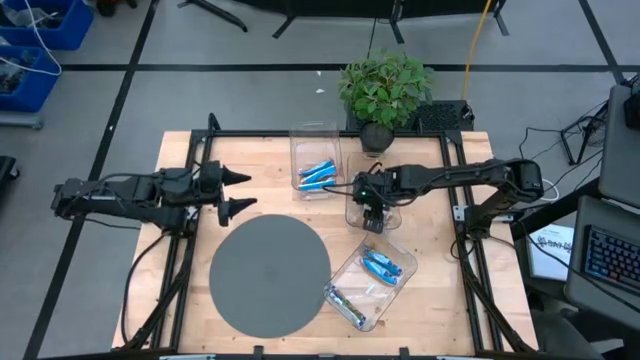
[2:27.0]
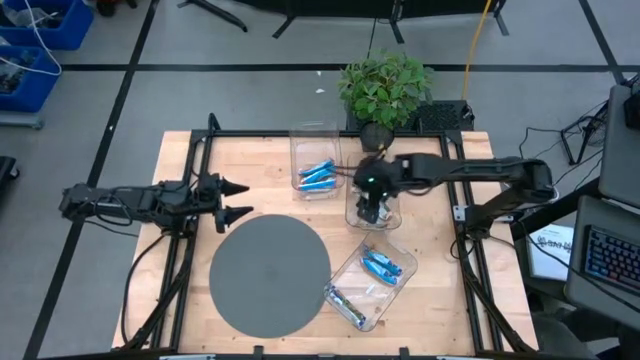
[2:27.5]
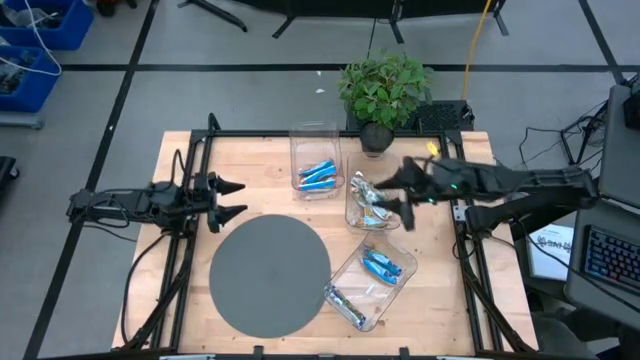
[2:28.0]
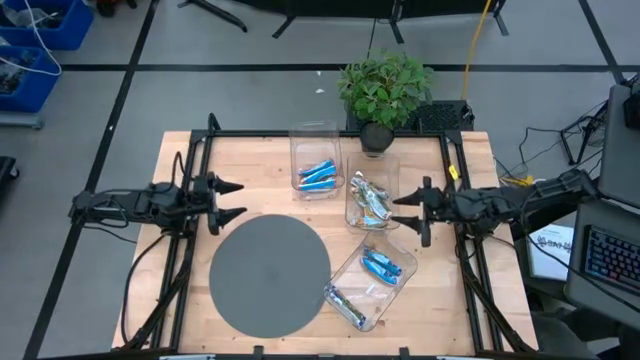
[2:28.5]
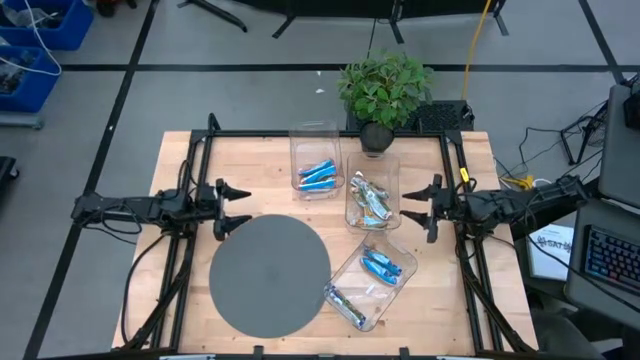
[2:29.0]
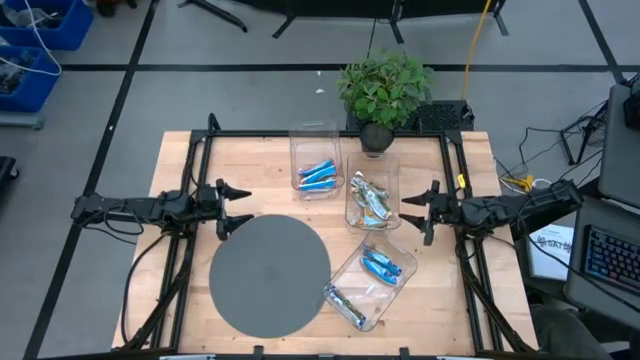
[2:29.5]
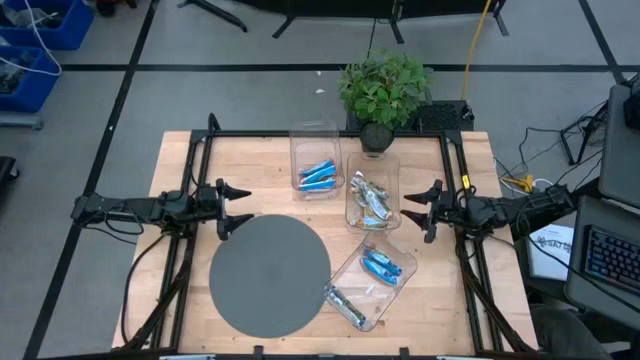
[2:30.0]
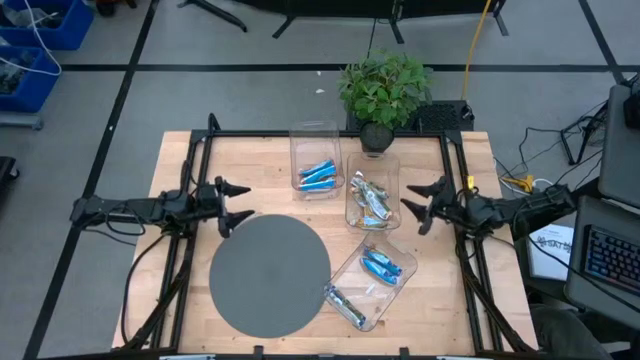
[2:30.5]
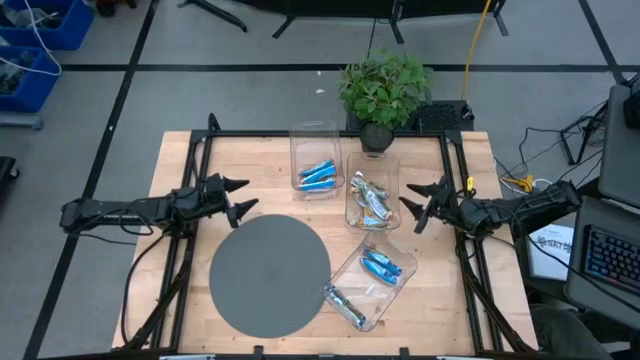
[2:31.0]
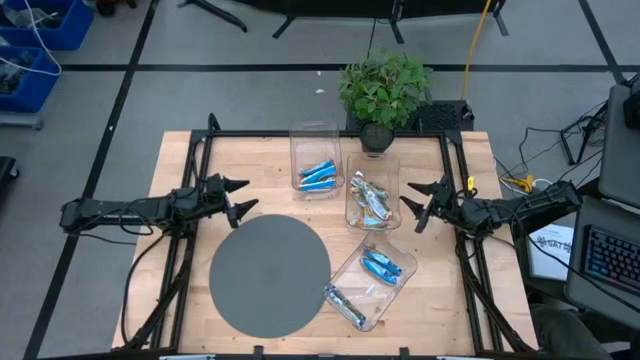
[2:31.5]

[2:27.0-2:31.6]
Task: Pick and place Granola Bars by type
Return to Home Position

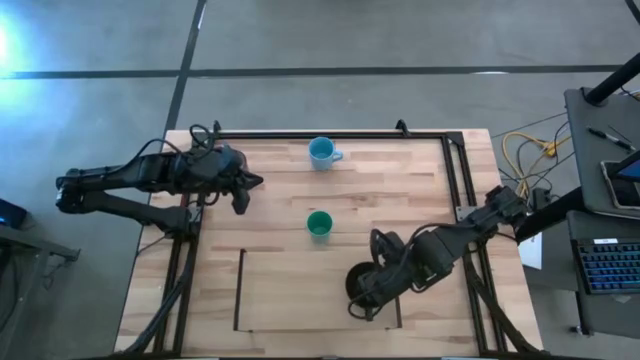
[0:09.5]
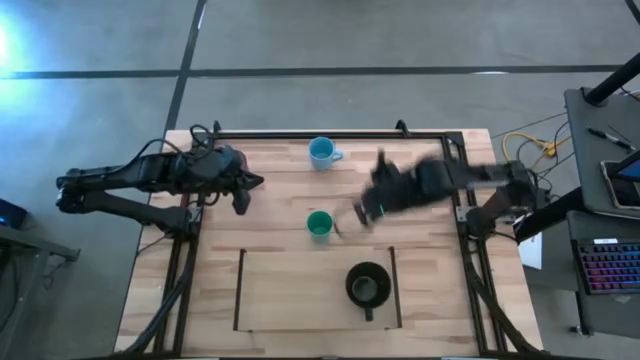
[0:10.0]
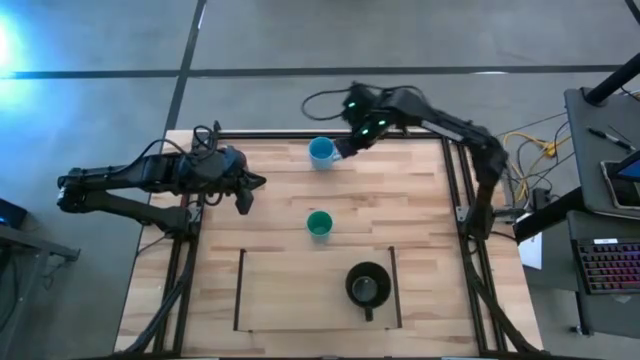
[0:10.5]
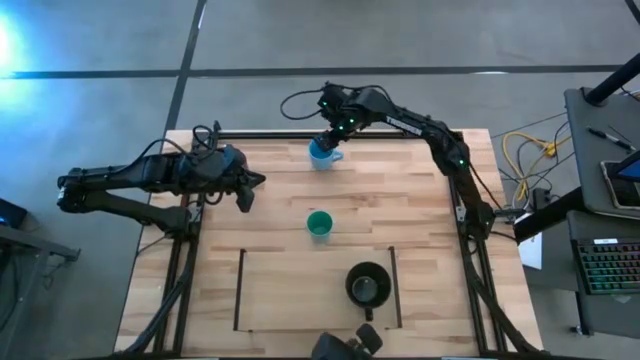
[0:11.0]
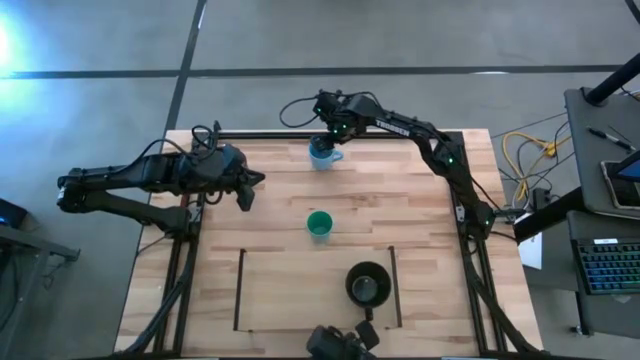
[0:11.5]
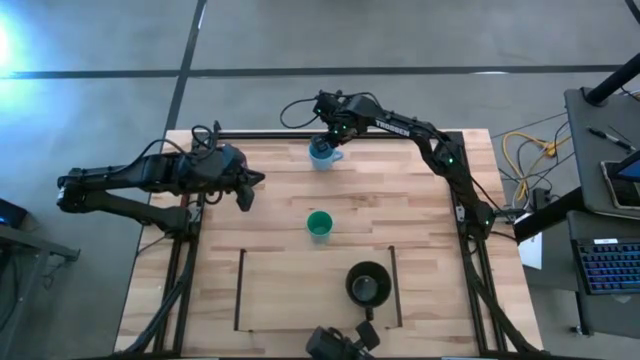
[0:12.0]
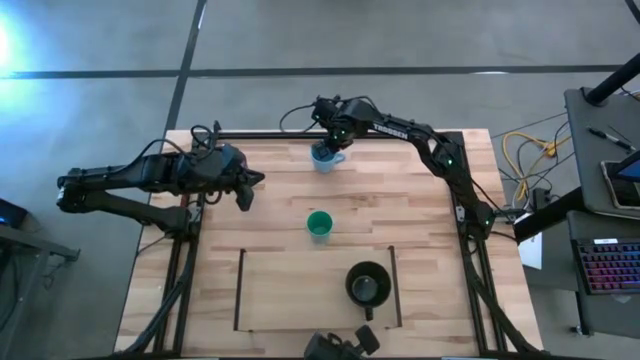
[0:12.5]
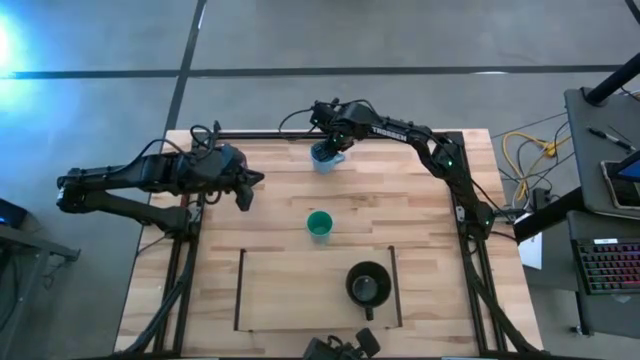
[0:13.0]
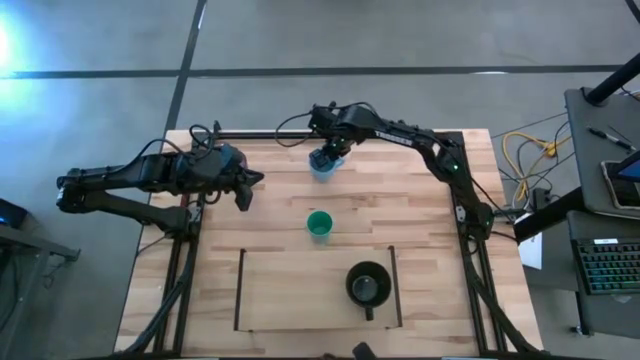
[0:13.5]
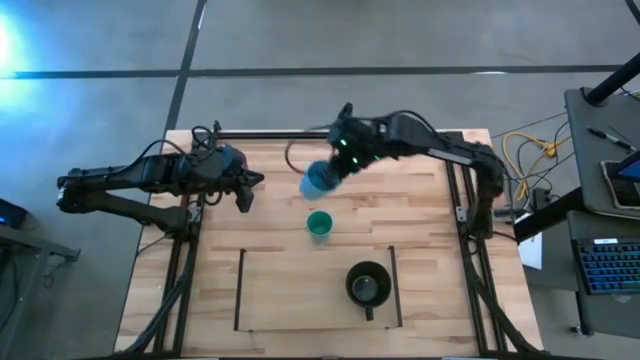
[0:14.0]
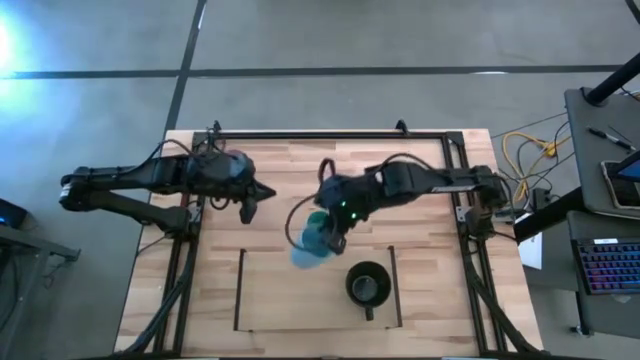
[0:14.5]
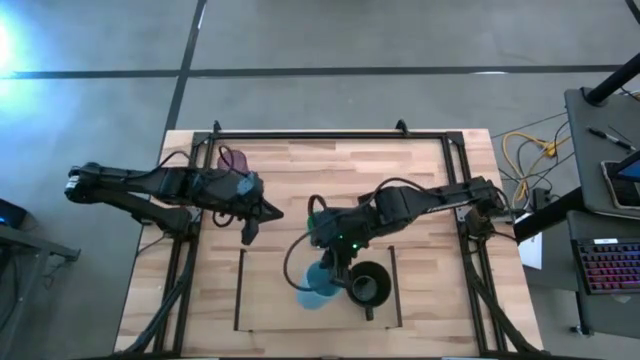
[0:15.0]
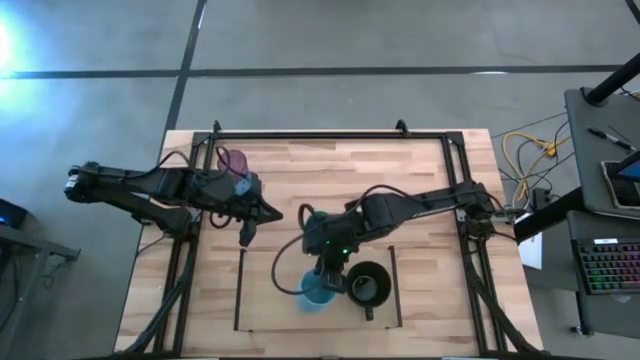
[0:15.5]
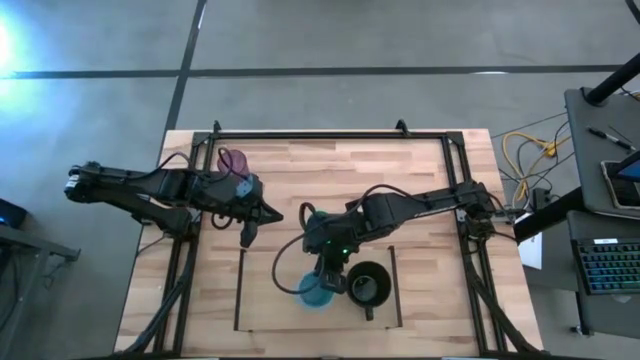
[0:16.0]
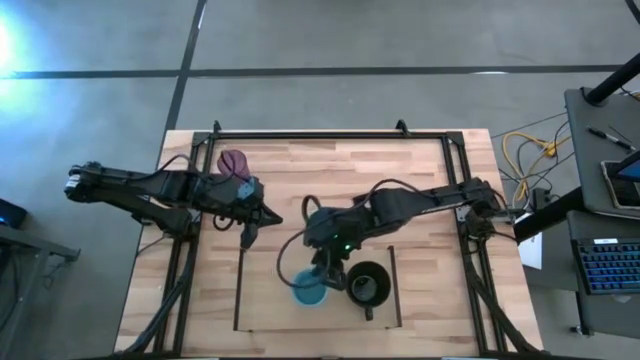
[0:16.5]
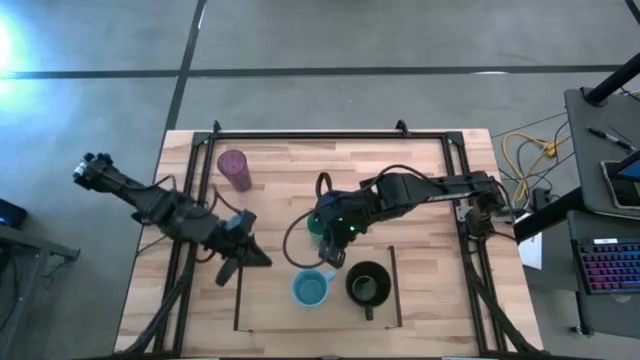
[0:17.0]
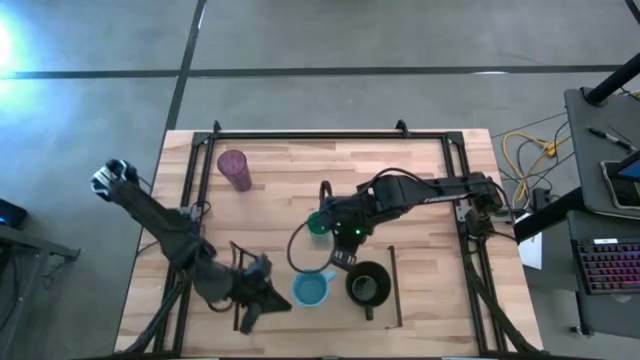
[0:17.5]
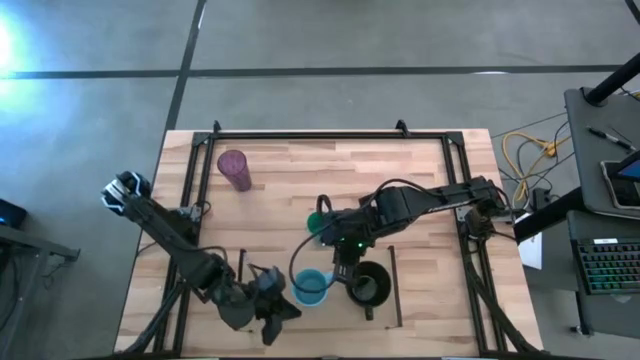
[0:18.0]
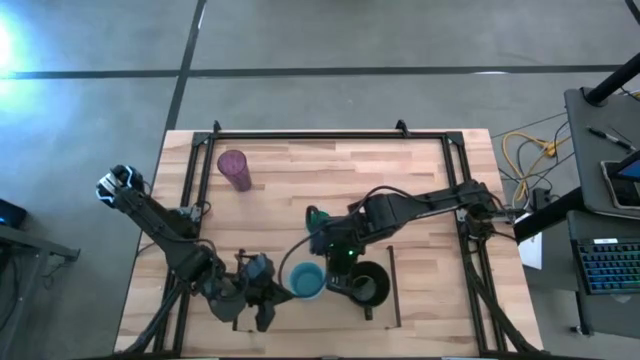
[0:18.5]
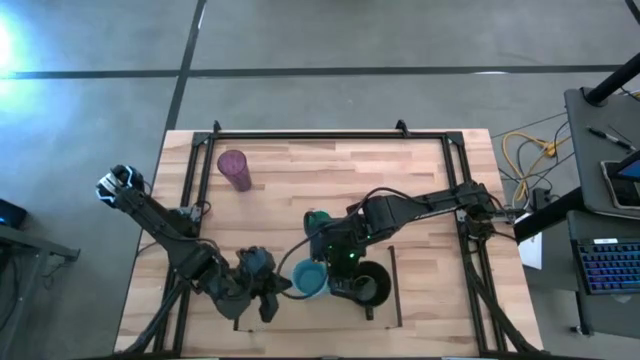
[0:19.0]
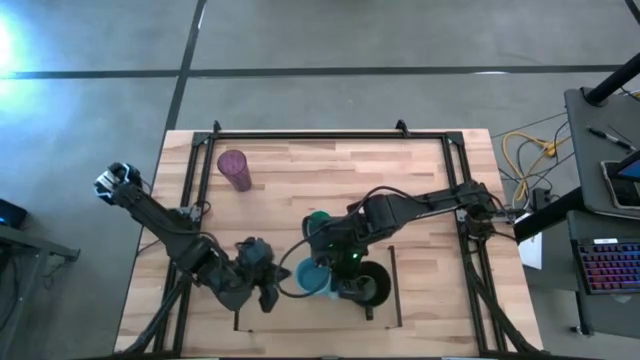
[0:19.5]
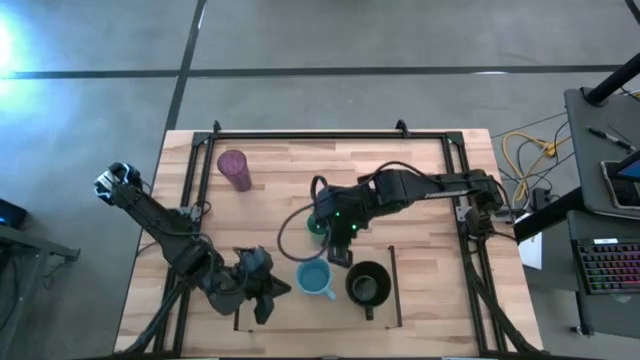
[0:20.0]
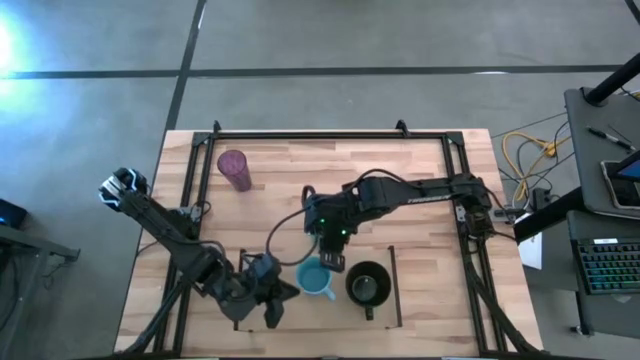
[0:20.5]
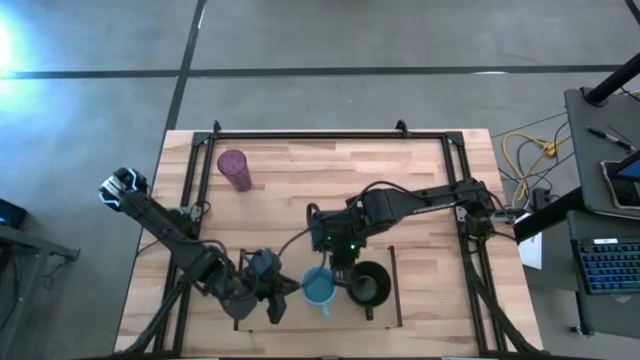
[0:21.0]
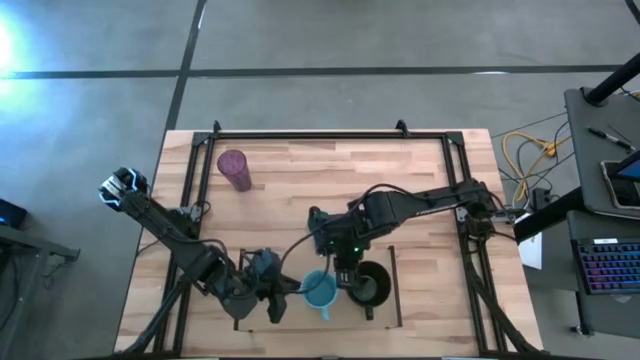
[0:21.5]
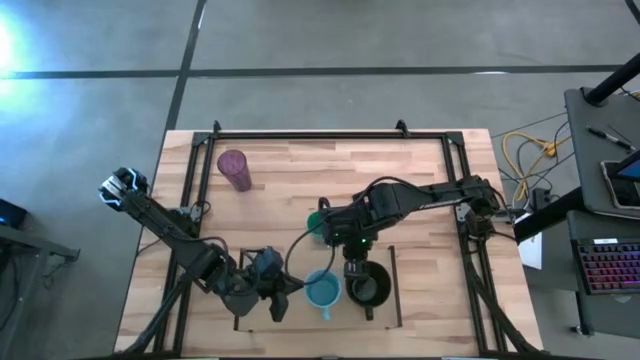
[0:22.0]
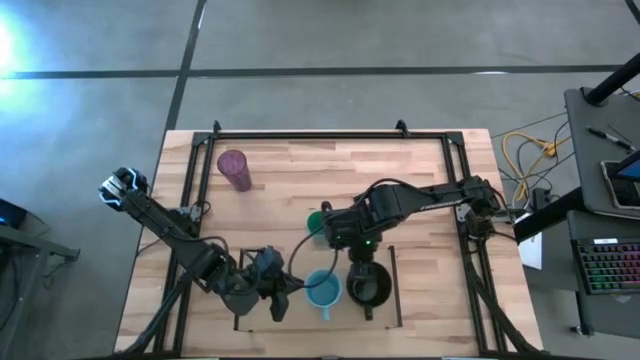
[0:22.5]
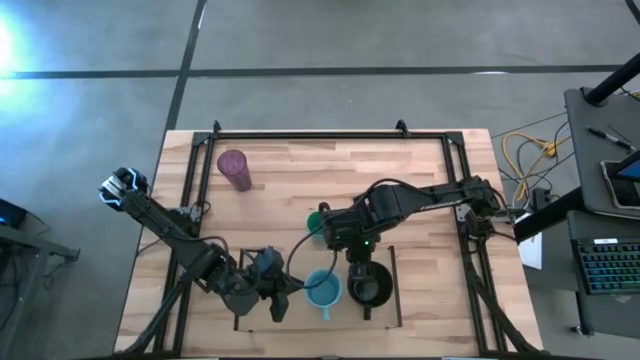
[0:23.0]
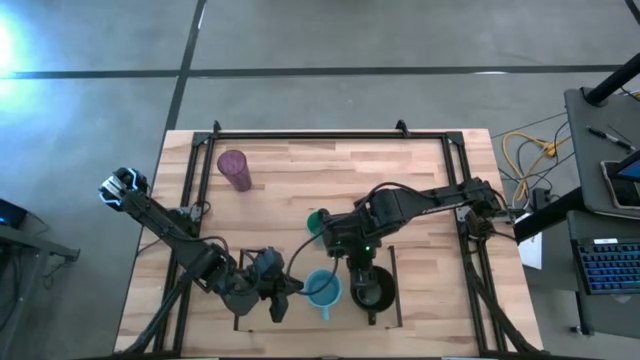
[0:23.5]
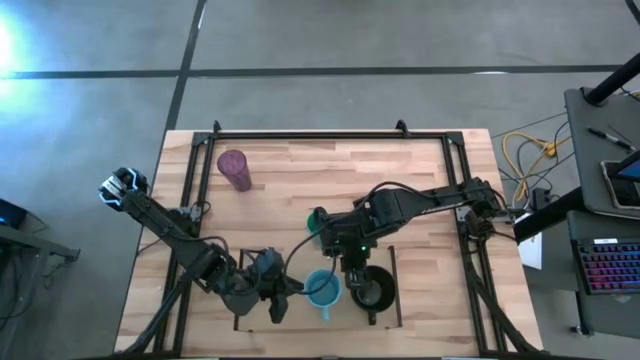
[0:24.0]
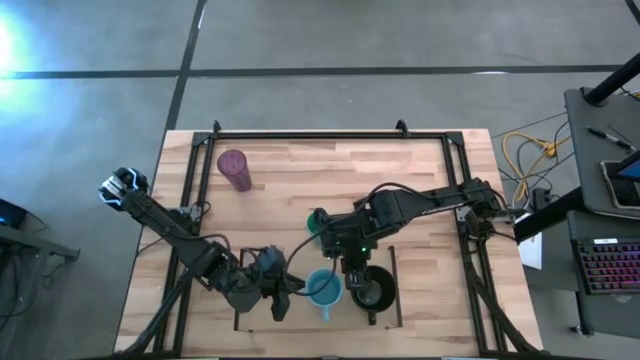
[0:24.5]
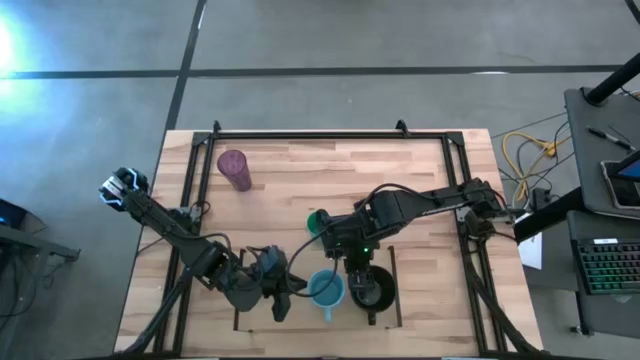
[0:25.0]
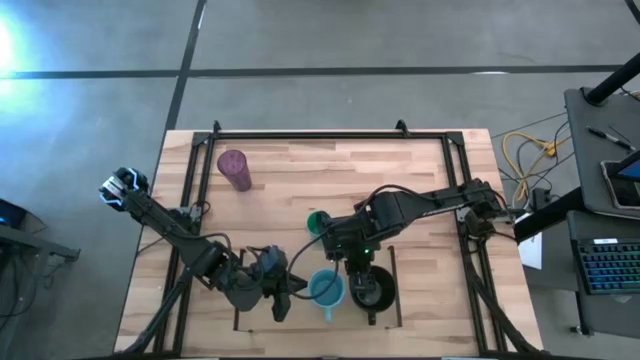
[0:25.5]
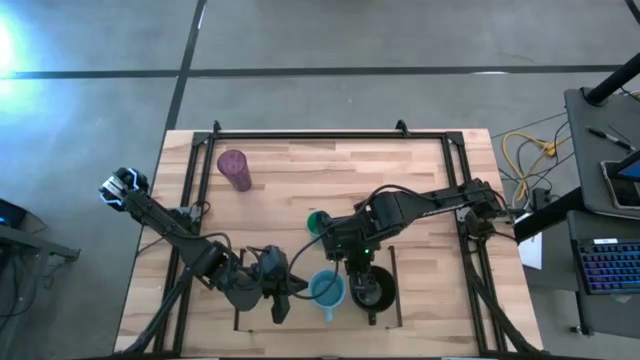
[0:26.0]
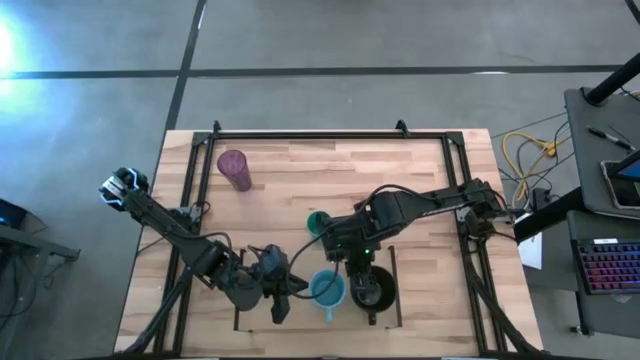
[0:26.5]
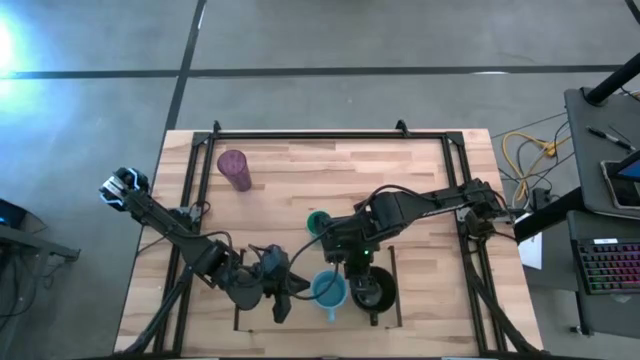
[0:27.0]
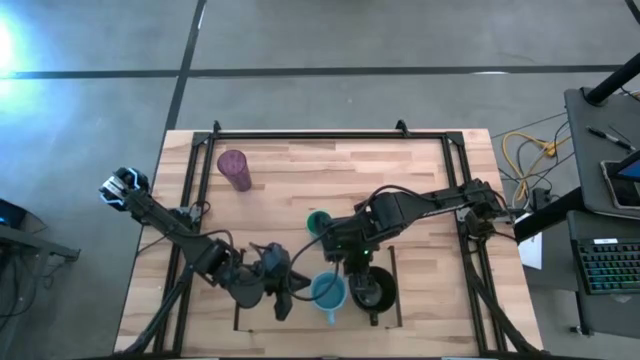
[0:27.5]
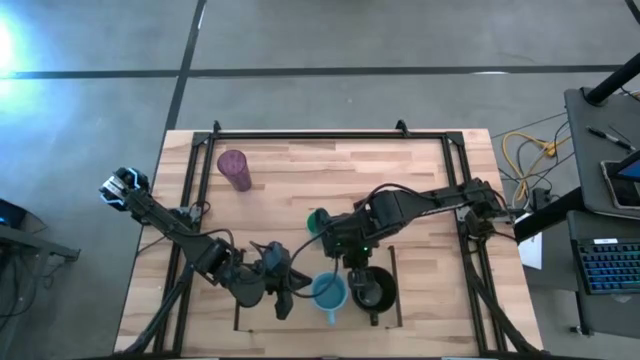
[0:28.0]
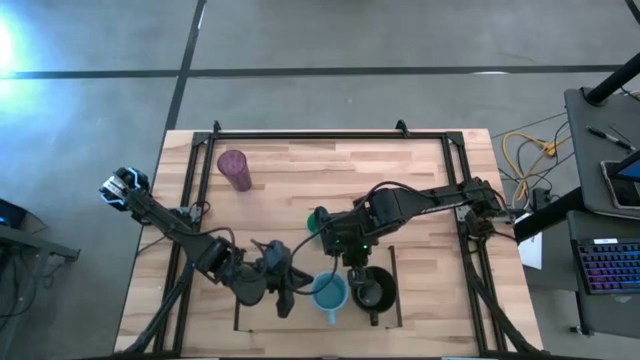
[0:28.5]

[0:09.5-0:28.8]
Task: Stack small to large cups/mugs on shelf
Put the light blue mug on the shelf
